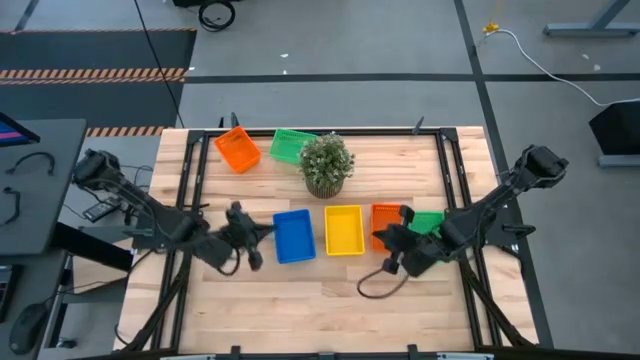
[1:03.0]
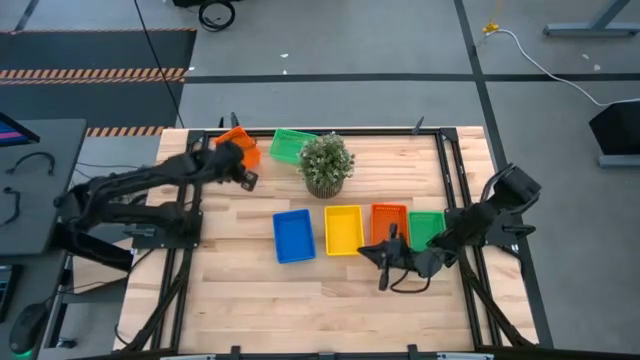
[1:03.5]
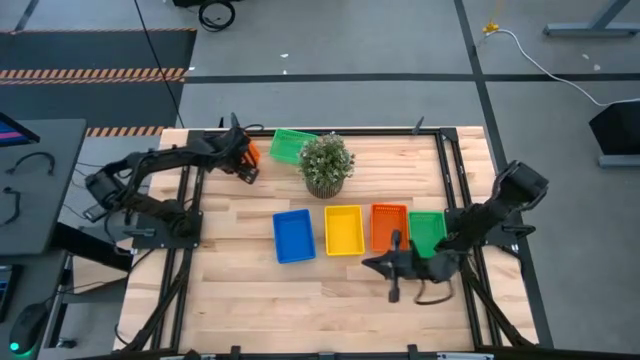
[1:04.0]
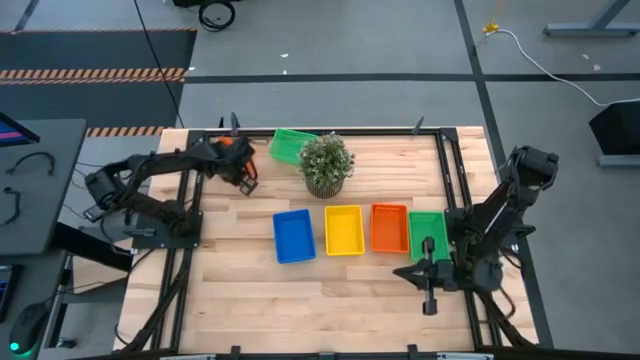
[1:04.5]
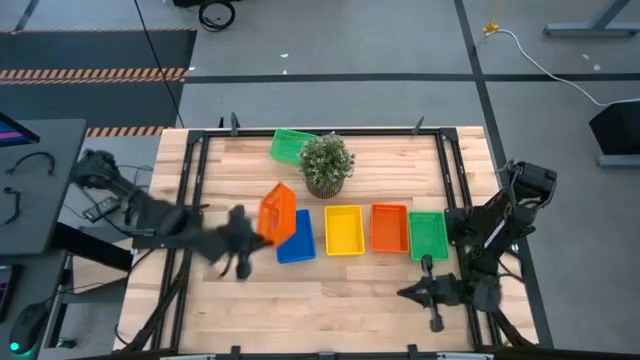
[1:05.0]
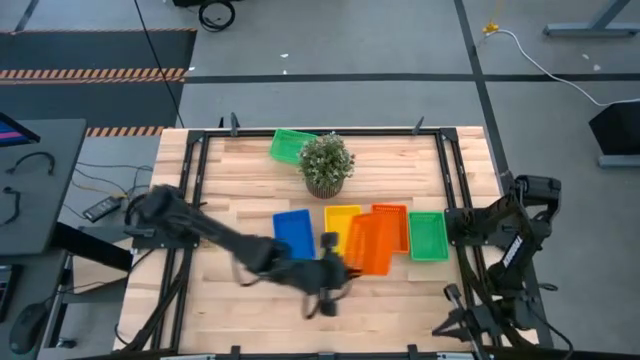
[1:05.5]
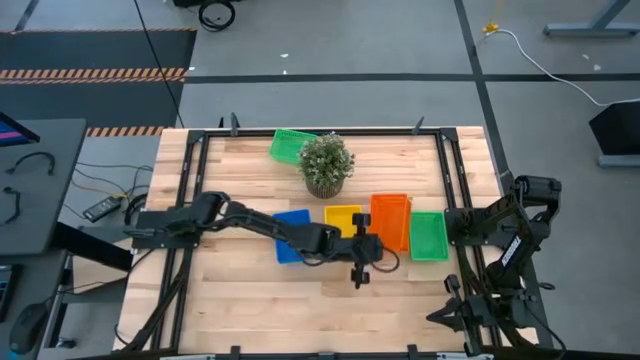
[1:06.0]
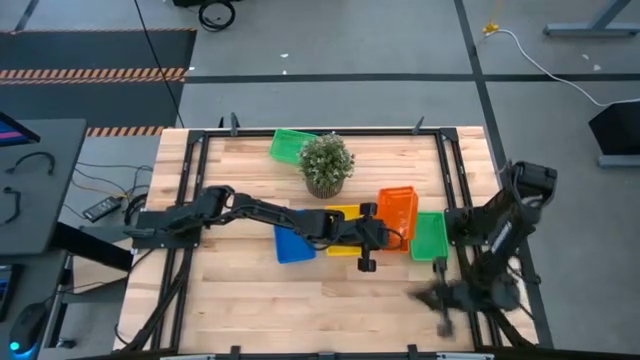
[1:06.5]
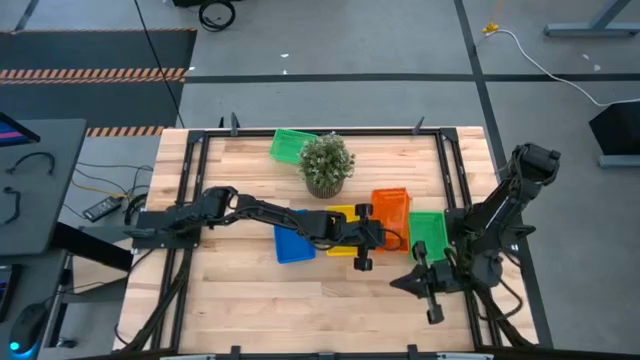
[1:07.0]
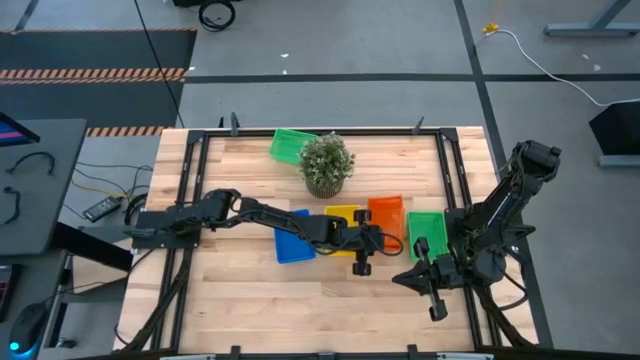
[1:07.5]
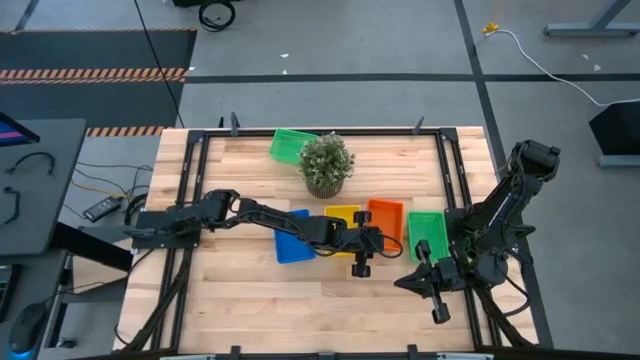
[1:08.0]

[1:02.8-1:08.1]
Stack the top orange bin on top of the bottom orange bin

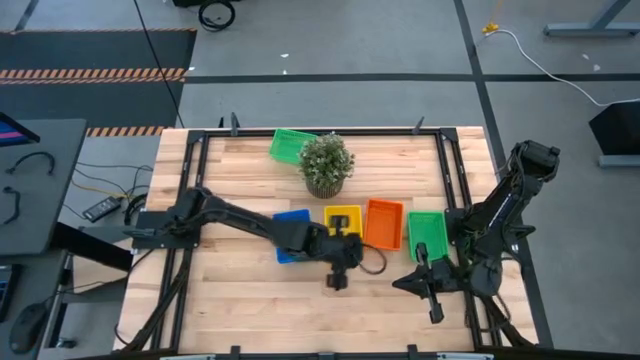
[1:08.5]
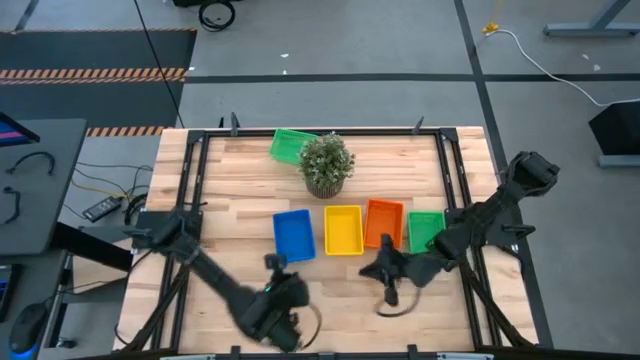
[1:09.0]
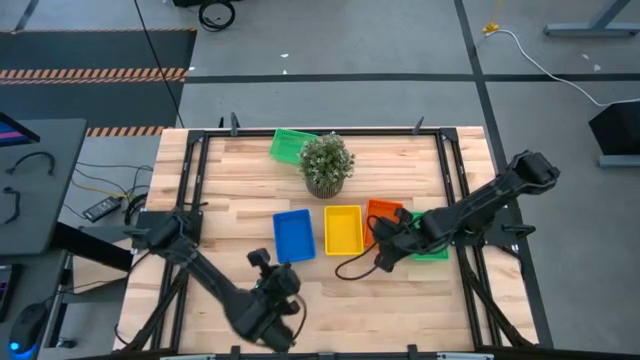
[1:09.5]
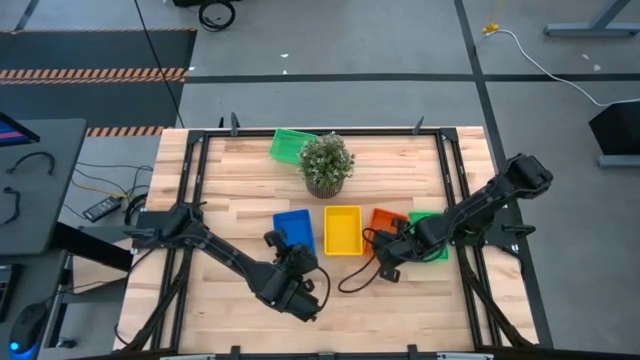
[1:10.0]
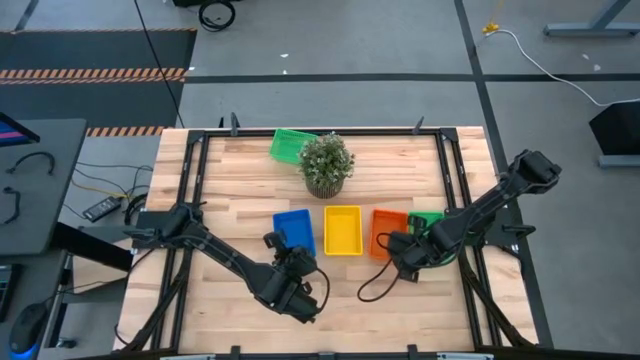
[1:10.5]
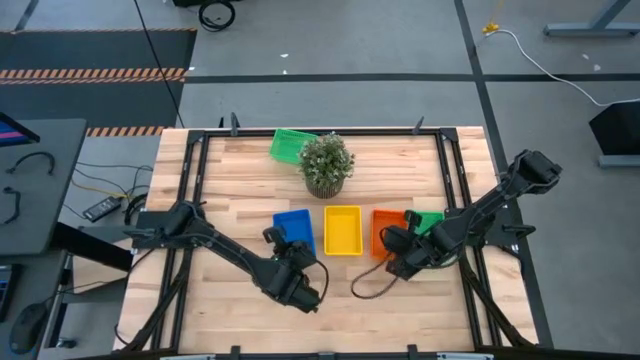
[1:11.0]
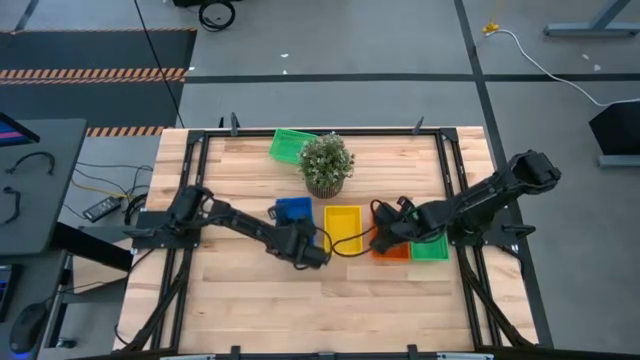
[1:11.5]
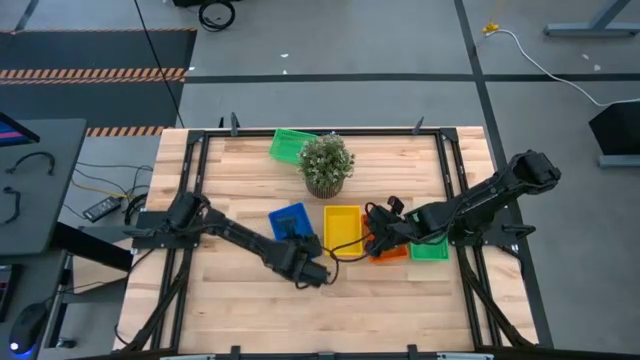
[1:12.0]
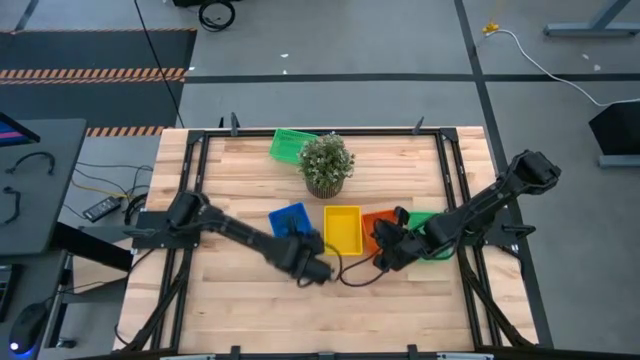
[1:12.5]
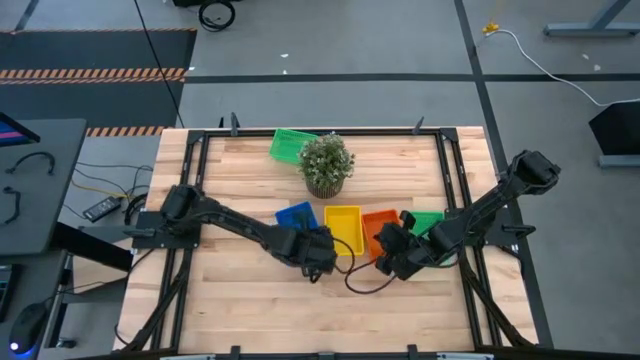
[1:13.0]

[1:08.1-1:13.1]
Adjust the stacked bins

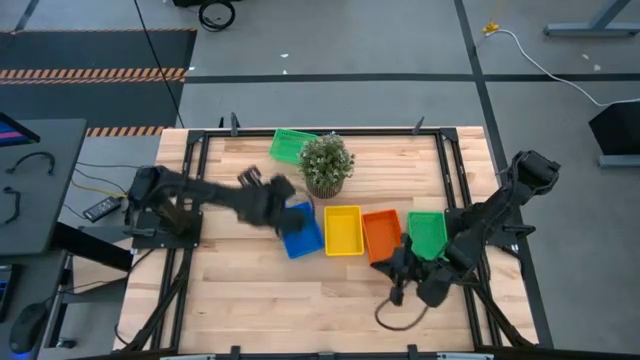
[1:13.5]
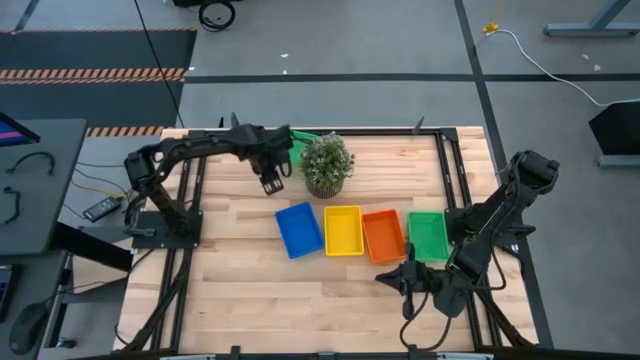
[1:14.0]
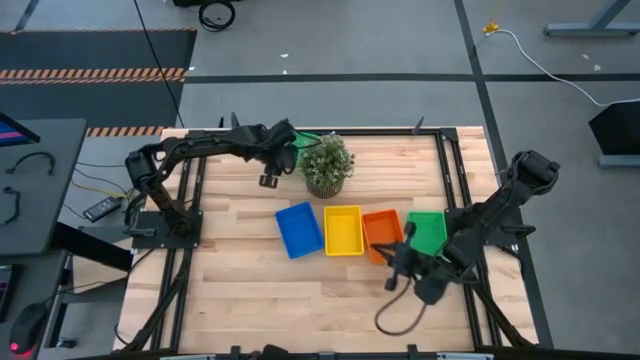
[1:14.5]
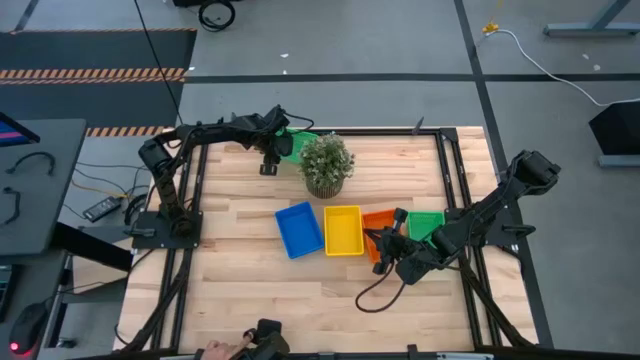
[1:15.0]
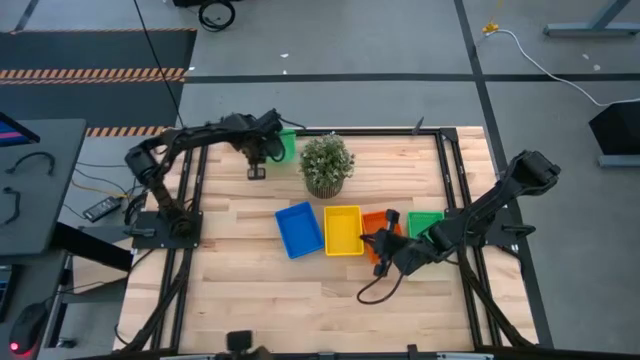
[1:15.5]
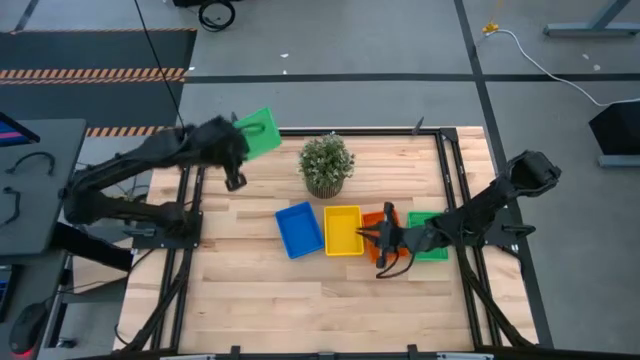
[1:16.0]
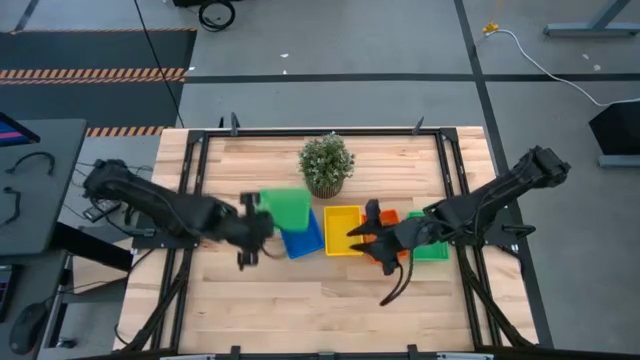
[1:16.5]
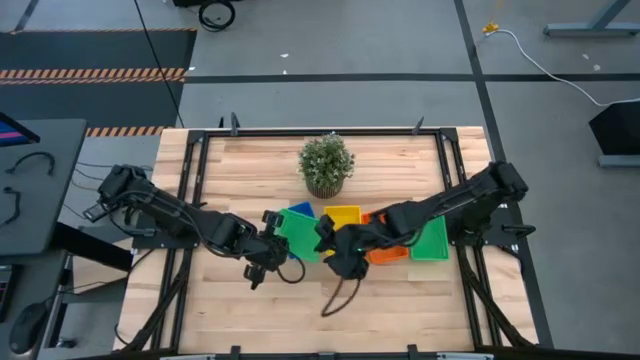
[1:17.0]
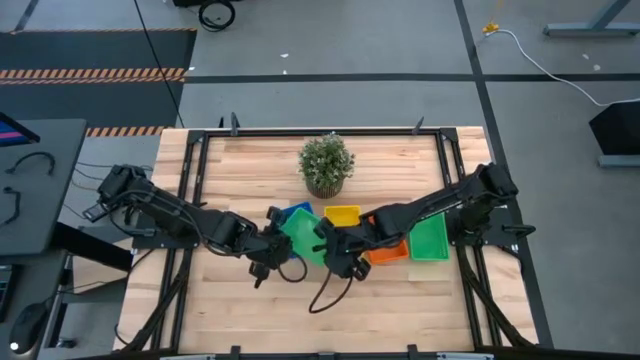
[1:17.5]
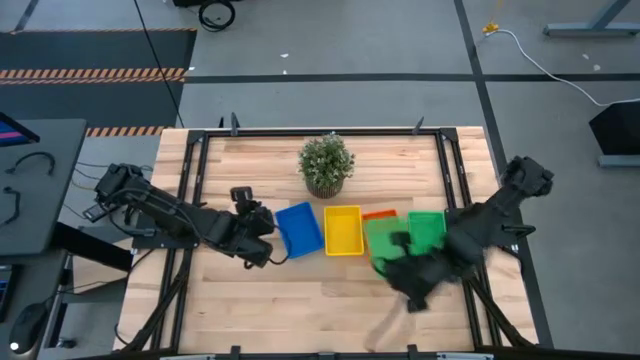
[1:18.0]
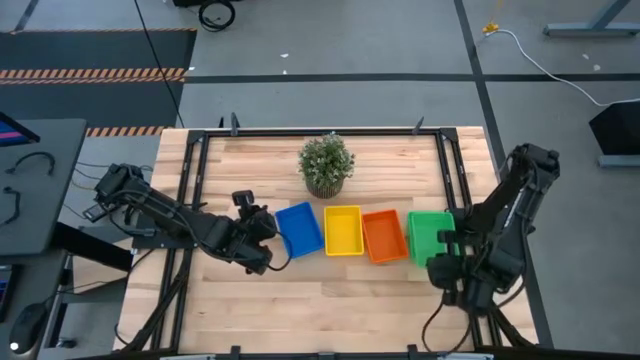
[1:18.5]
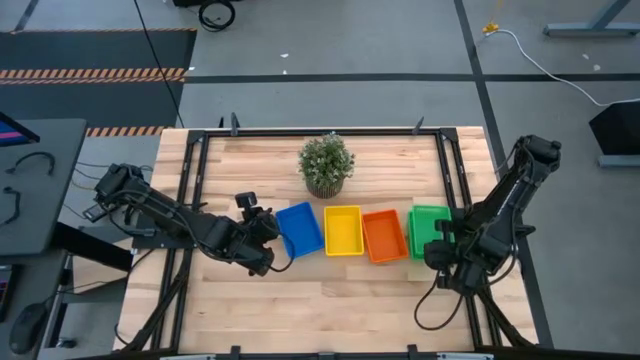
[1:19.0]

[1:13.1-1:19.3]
Stack the top green bin on top of the bottom green bin

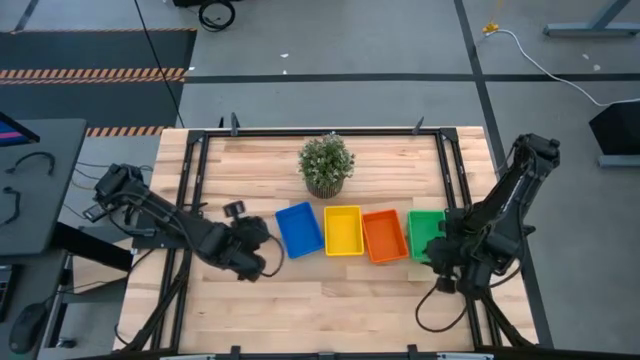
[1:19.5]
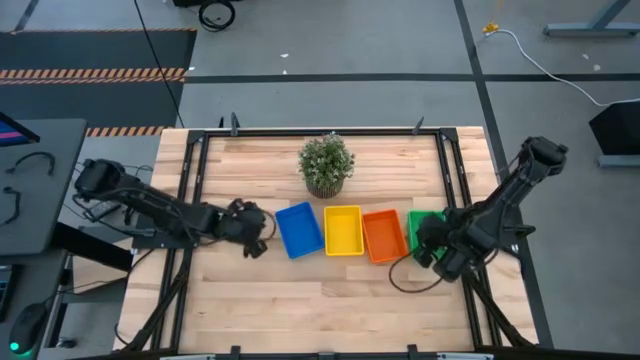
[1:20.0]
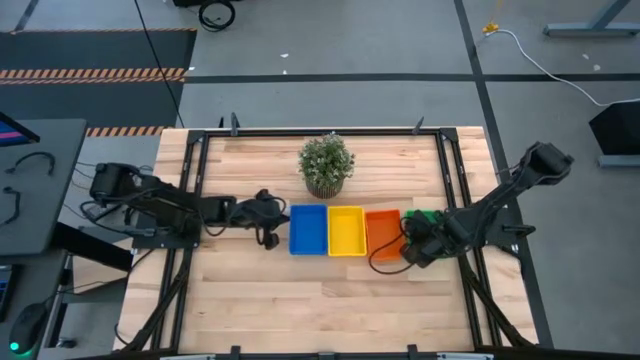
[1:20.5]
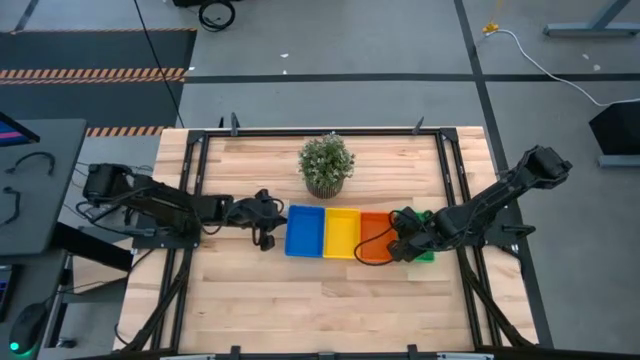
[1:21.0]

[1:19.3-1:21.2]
Adjust the stacked bins
